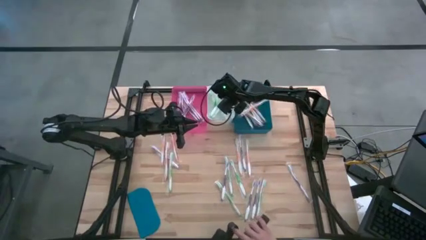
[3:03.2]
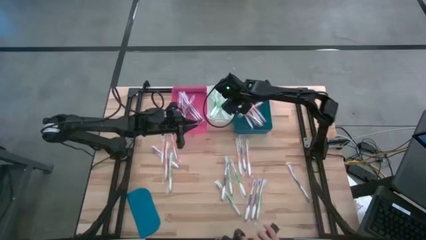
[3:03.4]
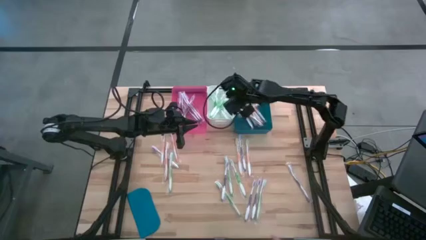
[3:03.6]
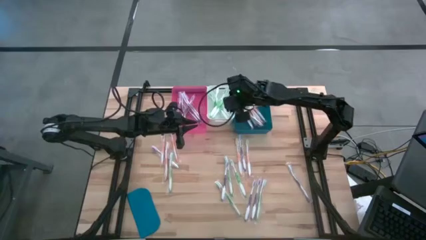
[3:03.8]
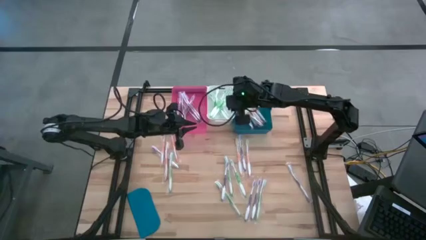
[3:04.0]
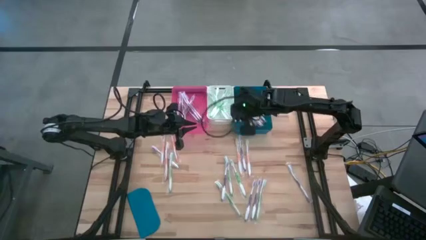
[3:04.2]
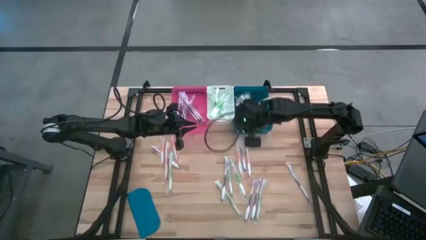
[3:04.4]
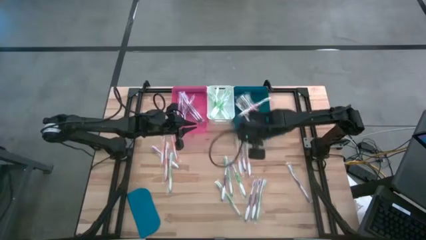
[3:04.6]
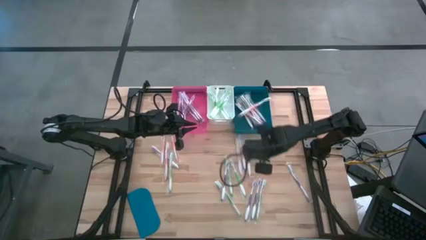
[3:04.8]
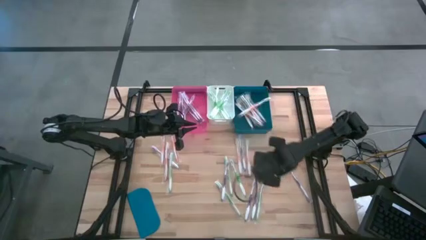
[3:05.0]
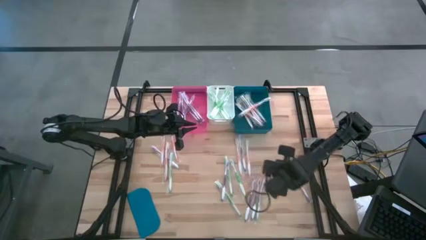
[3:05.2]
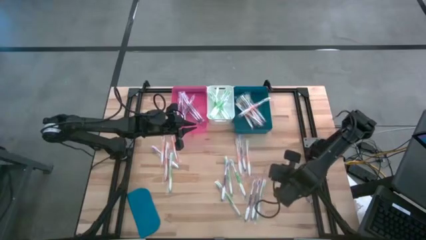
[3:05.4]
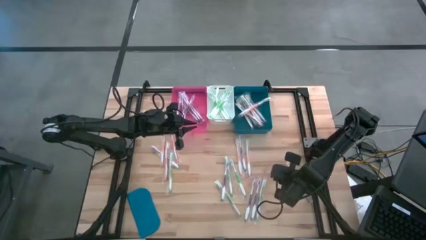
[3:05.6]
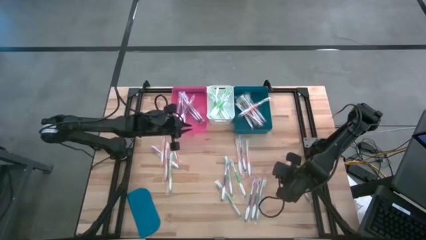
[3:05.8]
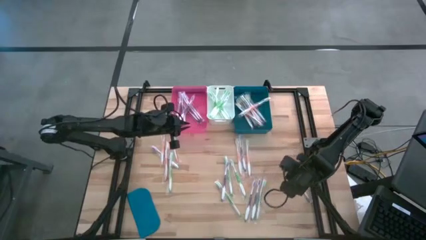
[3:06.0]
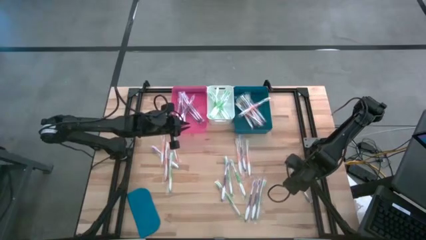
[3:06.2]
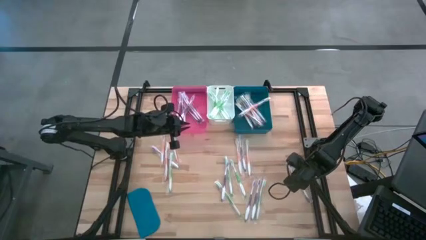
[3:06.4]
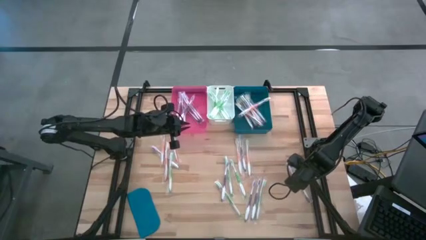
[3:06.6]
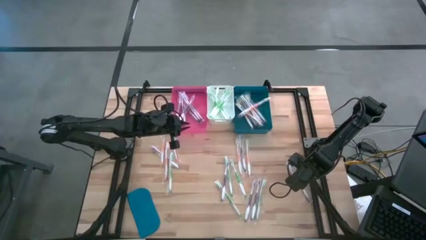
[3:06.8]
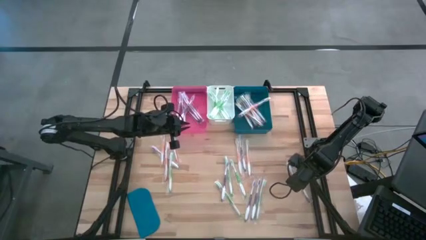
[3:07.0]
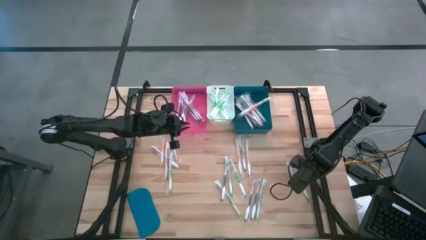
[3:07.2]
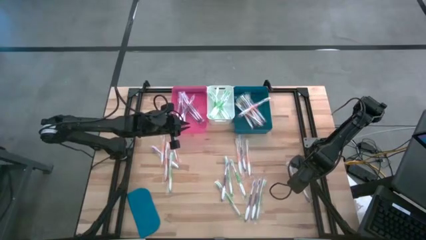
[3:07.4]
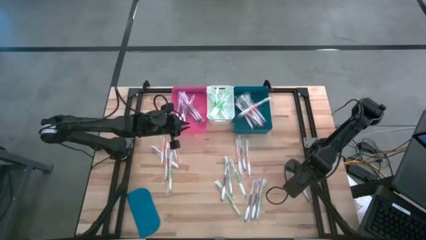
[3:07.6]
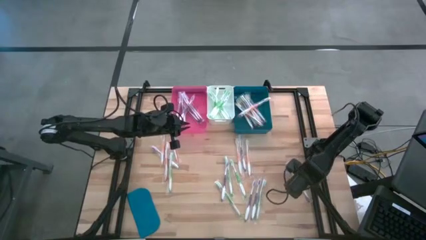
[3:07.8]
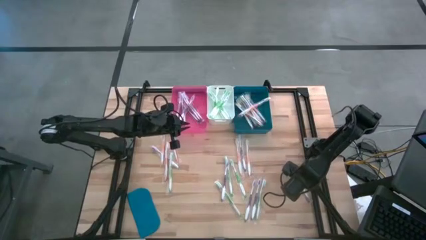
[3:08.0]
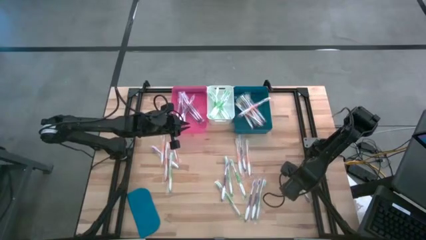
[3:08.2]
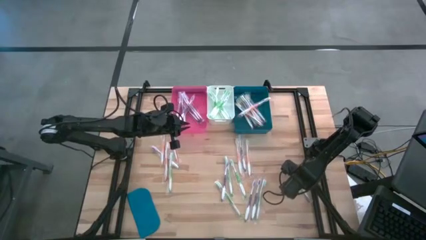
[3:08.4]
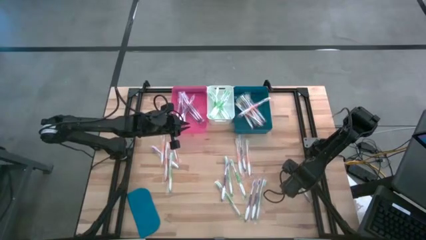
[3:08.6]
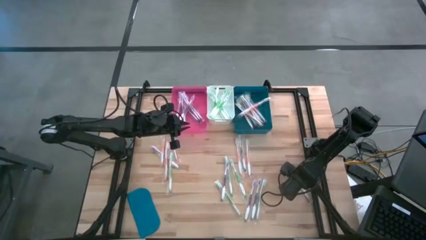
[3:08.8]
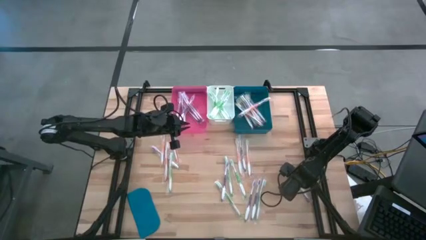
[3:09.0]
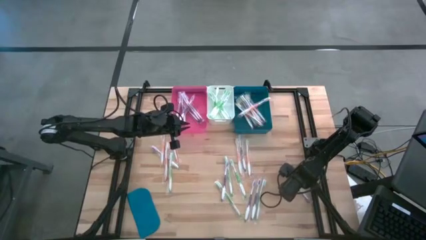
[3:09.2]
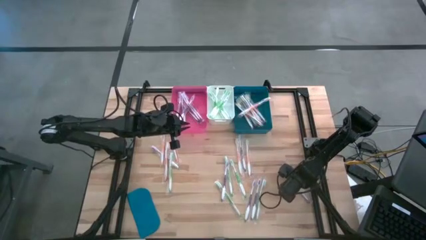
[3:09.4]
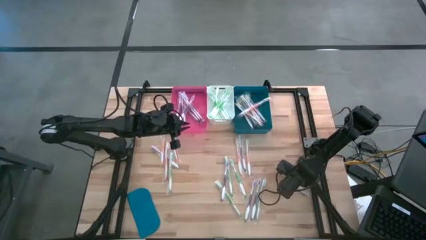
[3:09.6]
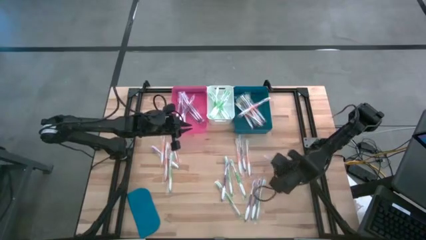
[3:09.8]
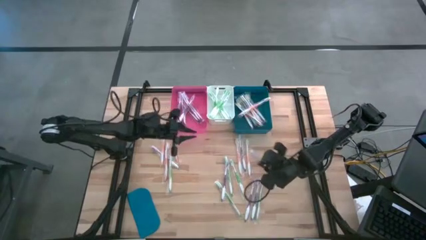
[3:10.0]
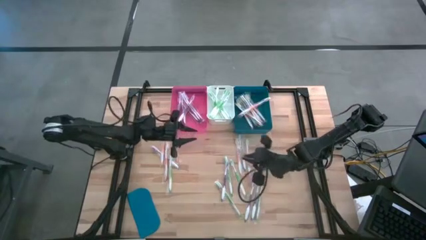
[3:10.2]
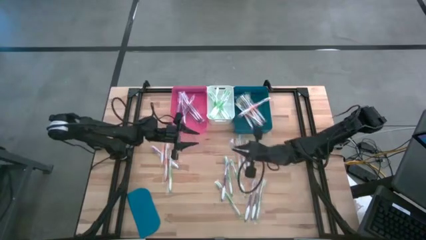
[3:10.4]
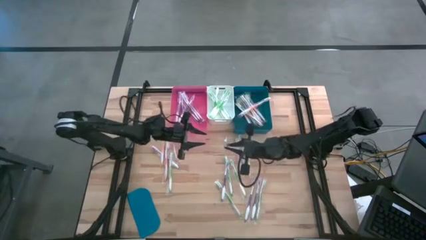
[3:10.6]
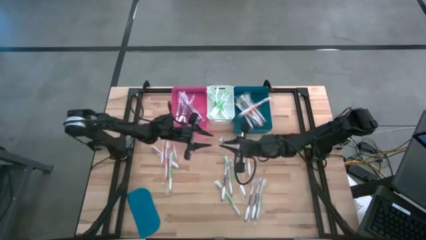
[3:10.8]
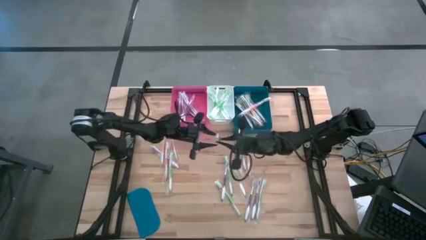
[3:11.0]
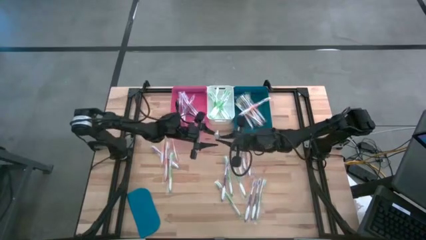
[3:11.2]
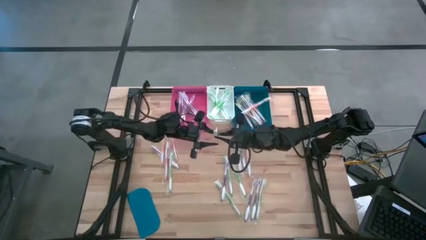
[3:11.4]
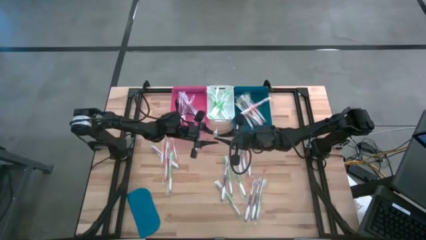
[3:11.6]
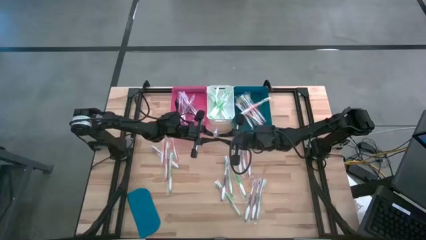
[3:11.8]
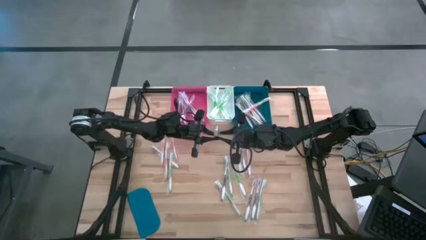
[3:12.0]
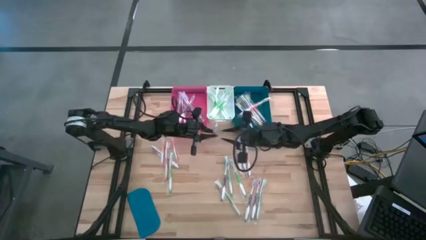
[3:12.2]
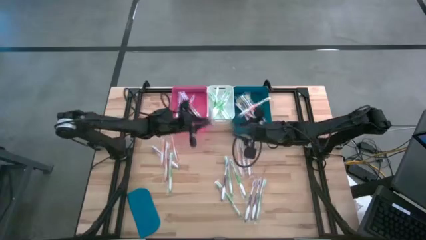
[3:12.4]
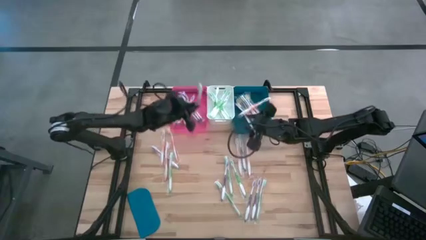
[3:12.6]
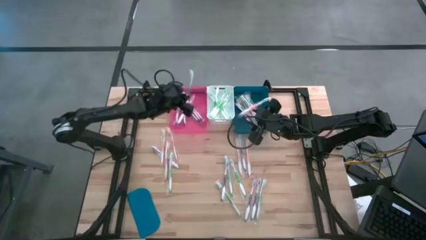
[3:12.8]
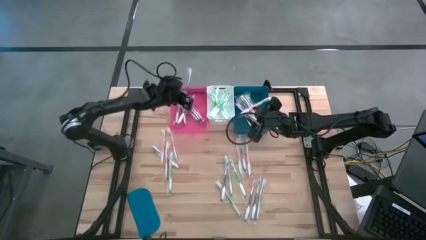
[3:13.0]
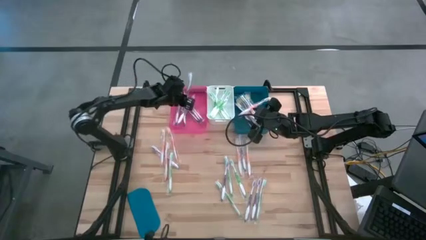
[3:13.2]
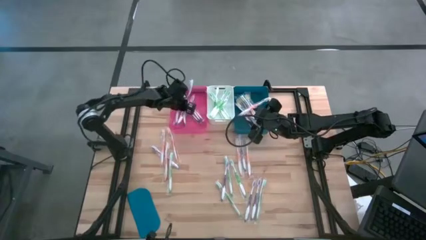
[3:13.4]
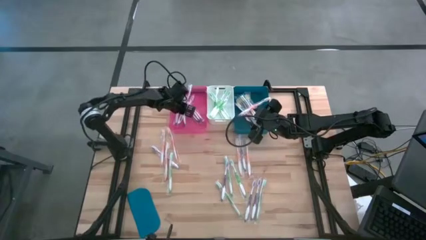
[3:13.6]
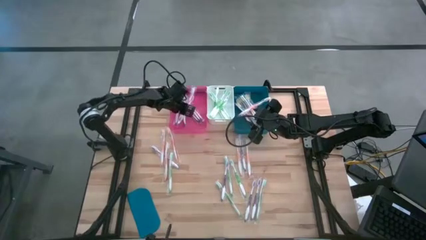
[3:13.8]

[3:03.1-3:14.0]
Task: Pick & Place Toothbrushes
Put the violet toothbrush into the pink bin

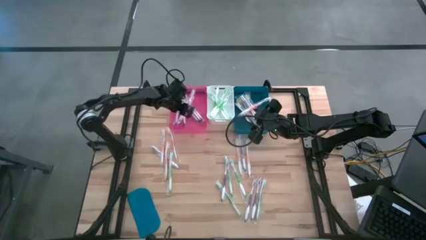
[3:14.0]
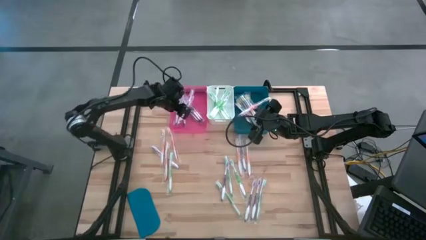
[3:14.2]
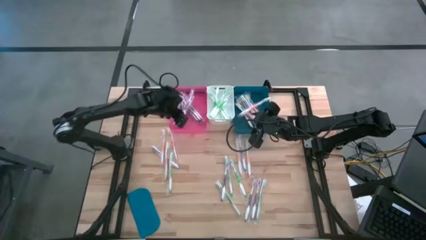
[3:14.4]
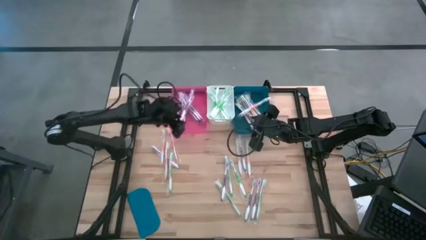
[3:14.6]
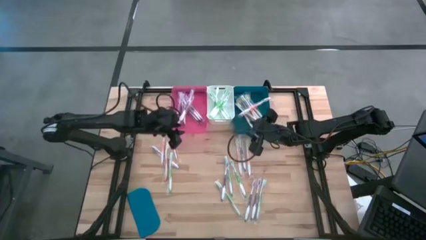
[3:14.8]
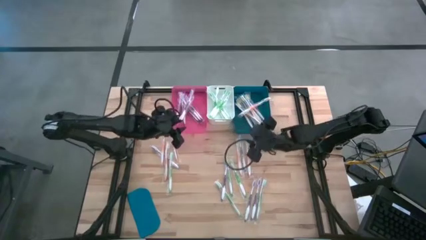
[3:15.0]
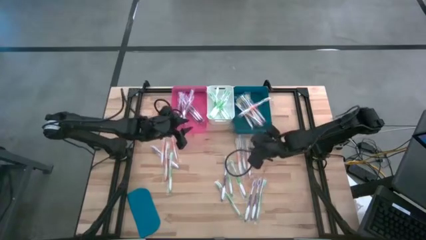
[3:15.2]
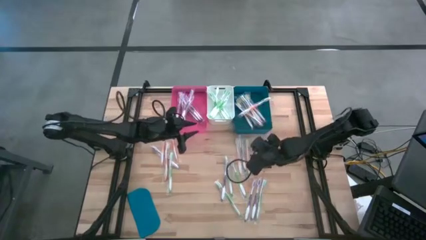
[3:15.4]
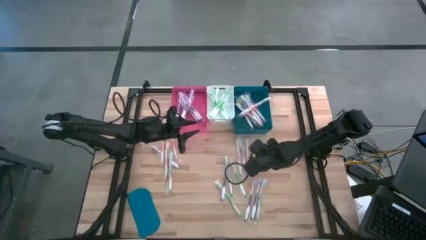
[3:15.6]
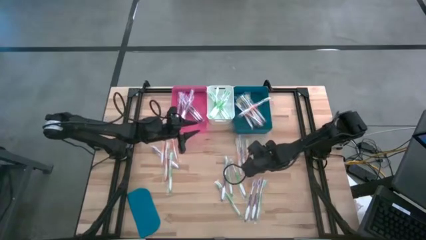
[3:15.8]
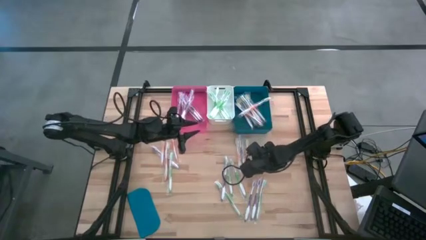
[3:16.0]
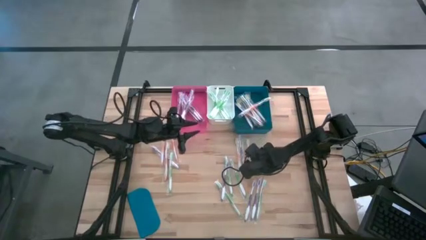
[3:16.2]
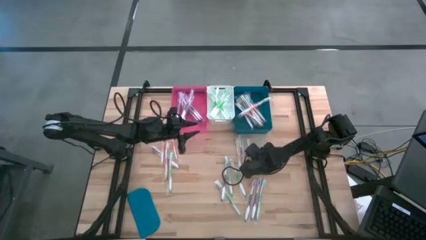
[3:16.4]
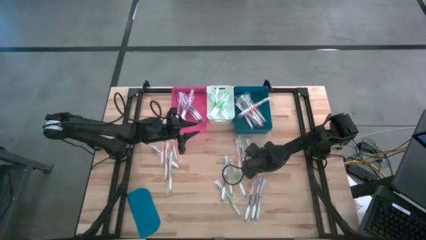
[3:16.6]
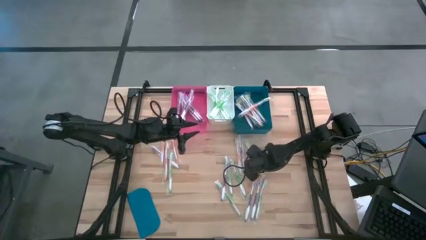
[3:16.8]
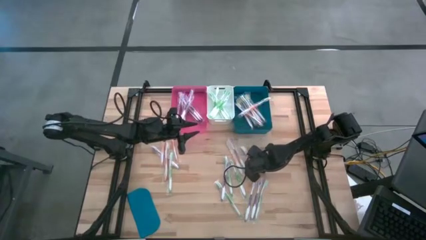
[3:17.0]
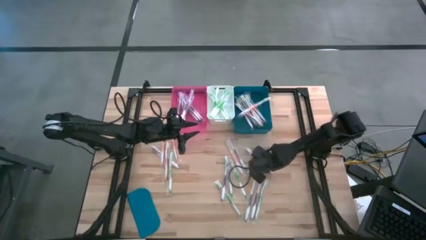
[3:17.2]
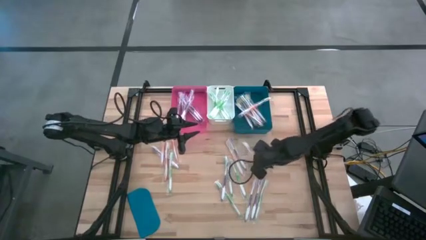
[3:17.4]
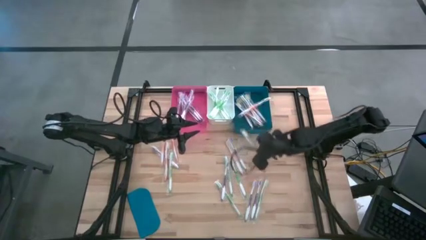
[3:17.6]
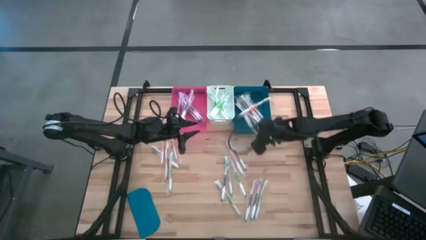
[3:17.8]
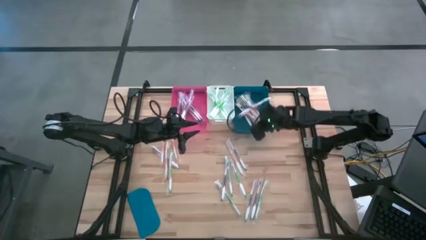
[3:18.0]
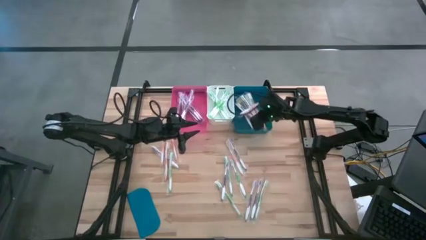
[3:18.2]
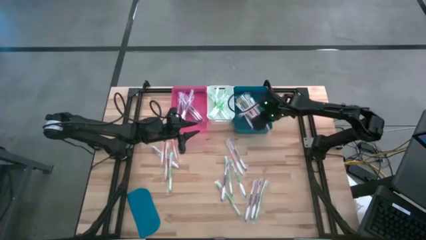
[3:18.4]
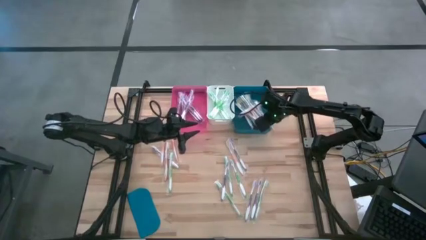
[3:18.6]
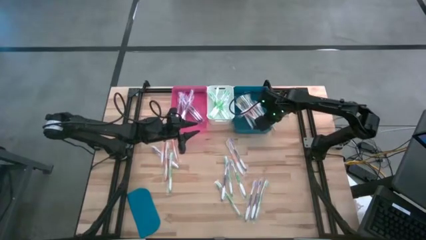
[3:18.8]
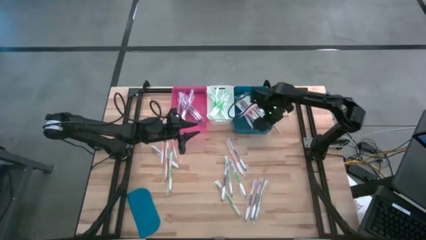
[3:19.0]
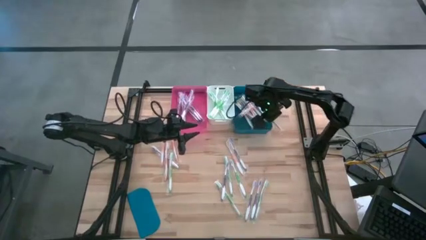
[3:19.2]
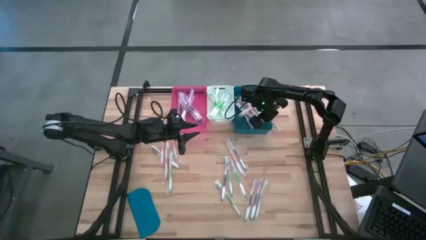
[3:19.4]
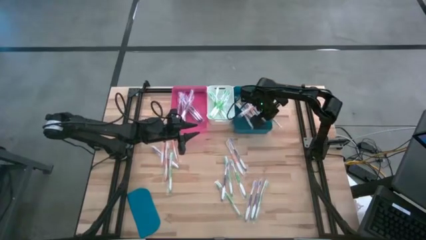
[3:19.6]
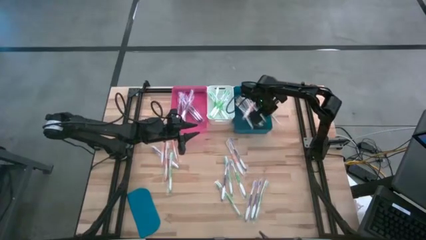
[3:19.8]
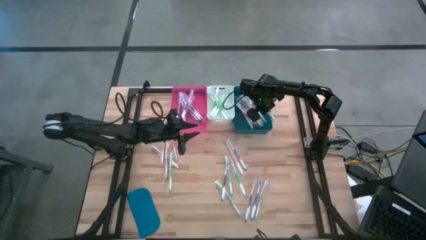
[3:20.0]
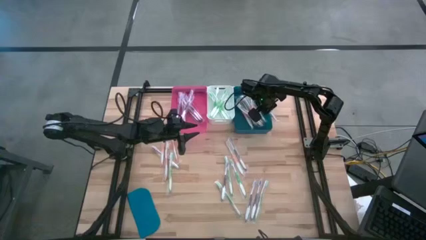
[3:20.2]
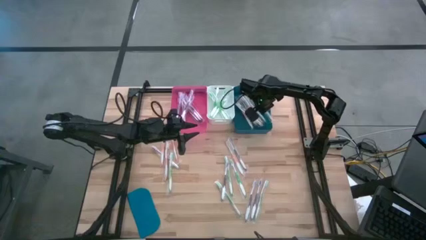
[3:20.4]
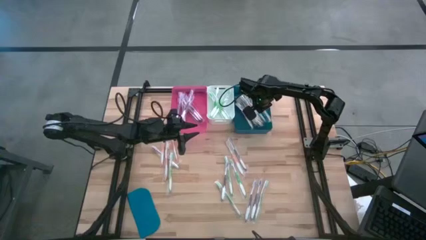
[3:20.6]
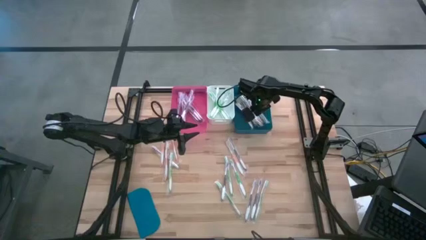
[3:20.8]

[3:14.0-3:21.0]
Put the orange toothbrush into the blue bin
